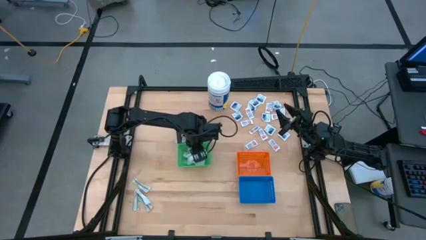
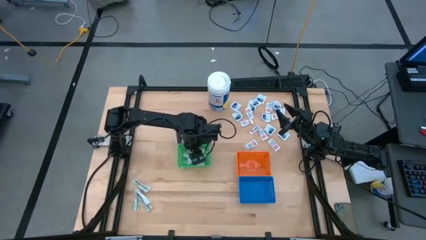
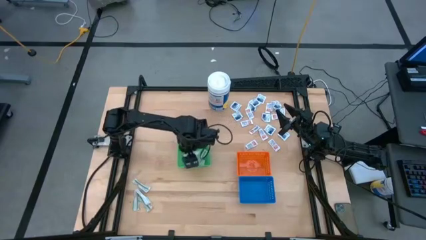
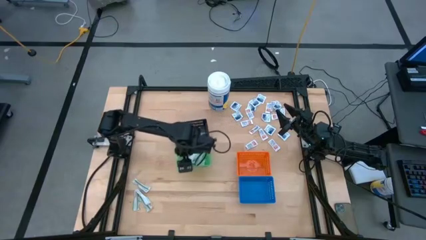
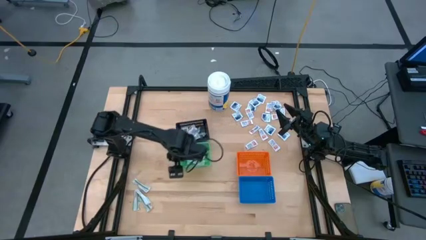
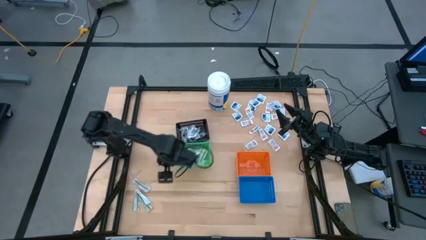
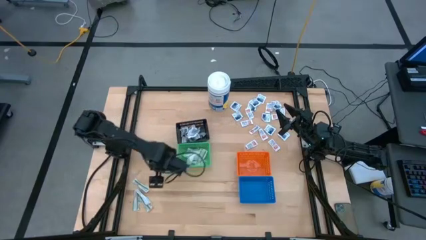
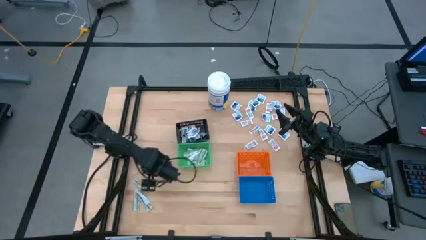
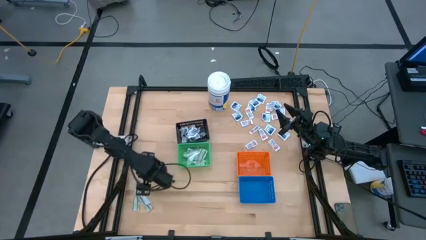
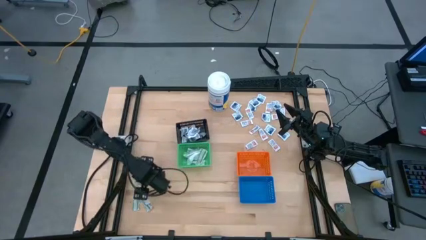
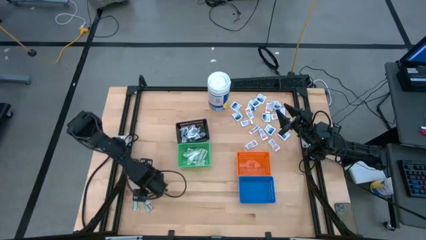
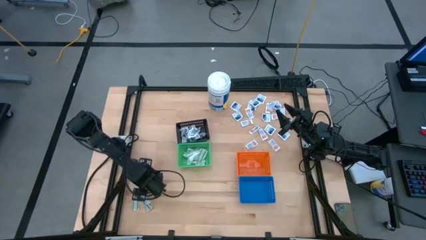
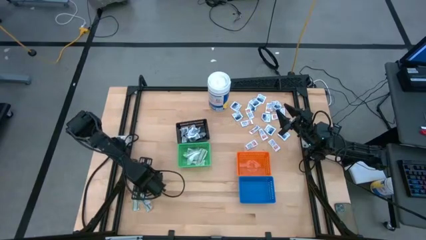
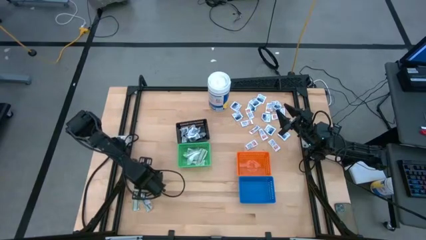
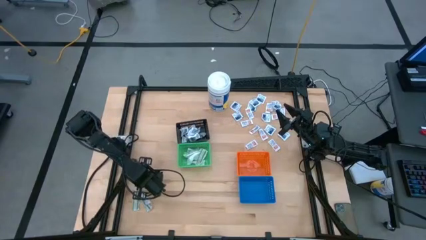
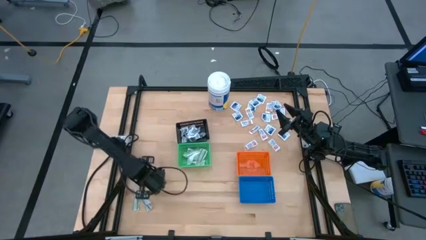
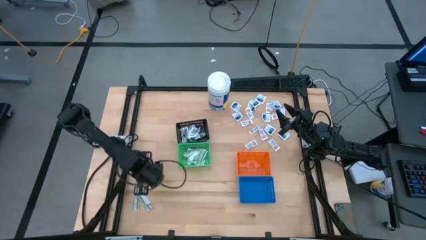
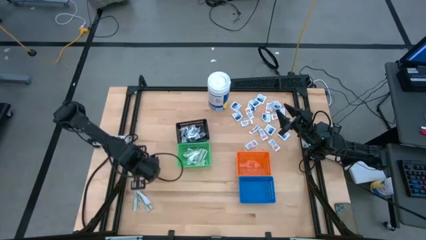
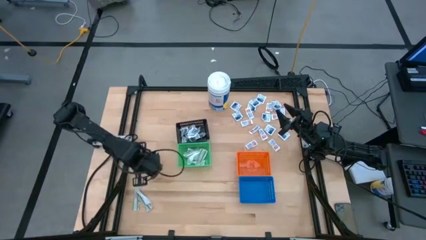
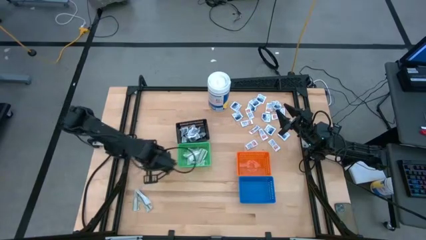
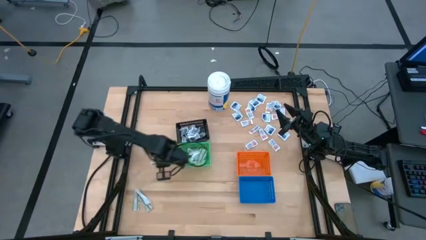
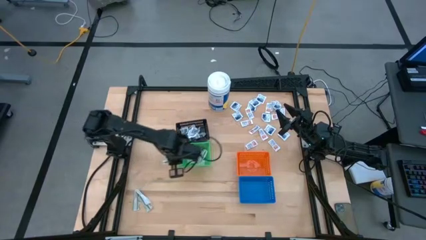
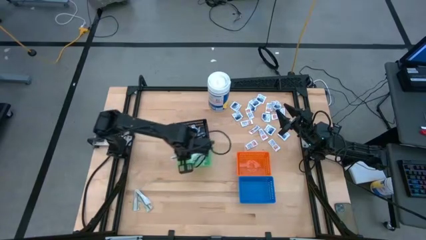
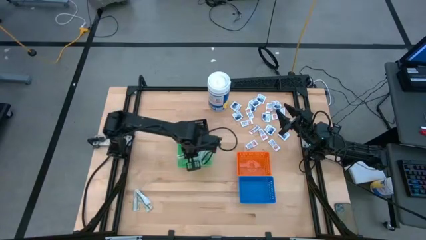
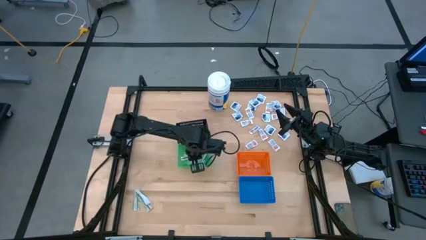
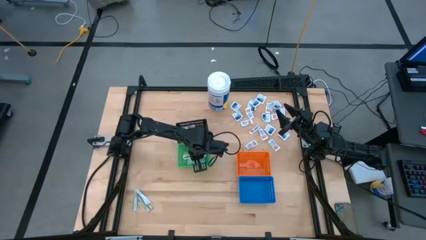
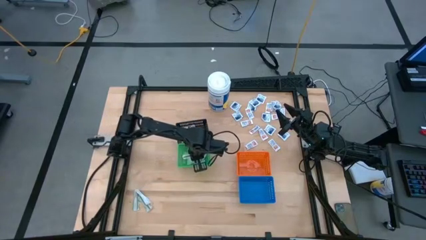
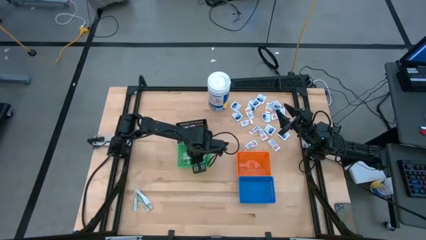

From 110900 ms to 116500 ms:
Task: Pick & Place First Aid Supplies
Put the green bandage into the green bin

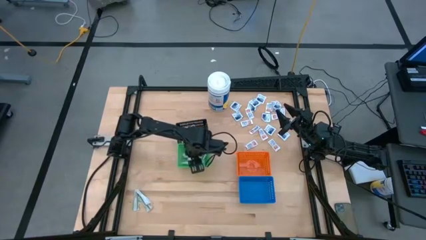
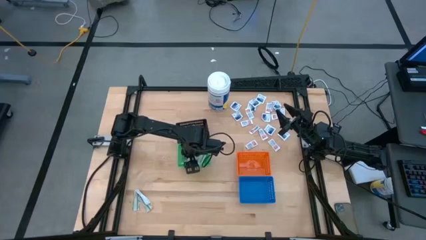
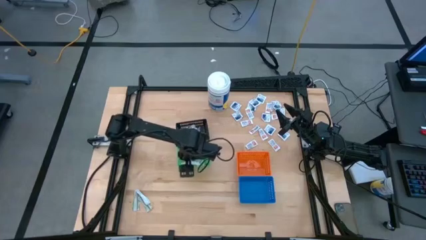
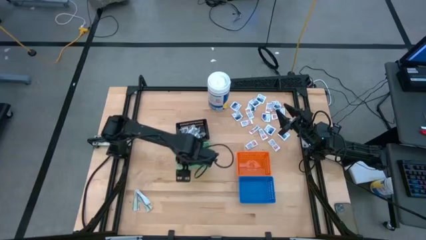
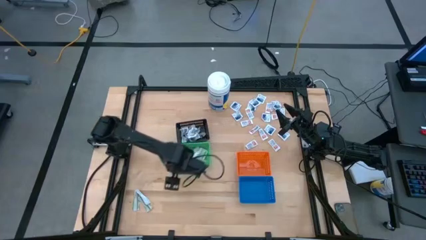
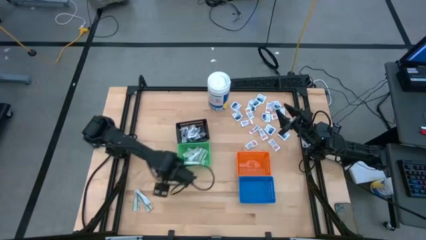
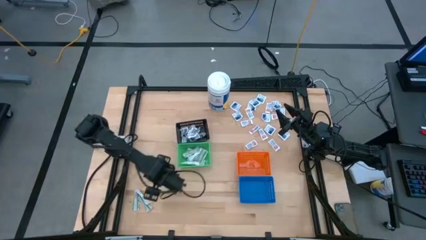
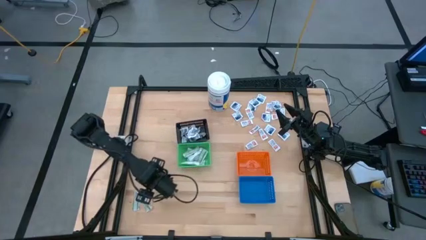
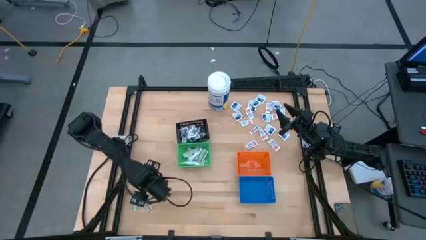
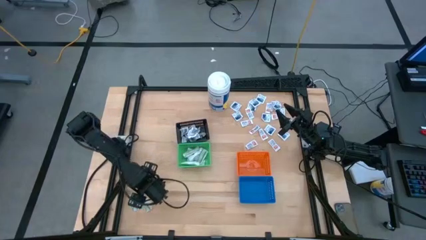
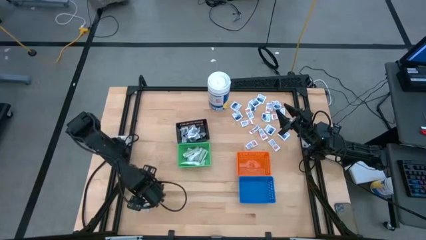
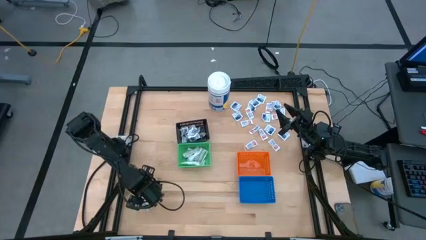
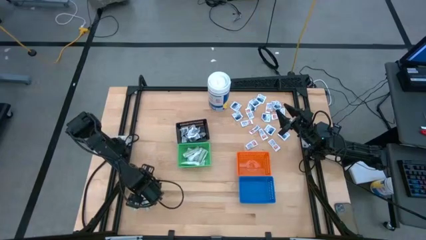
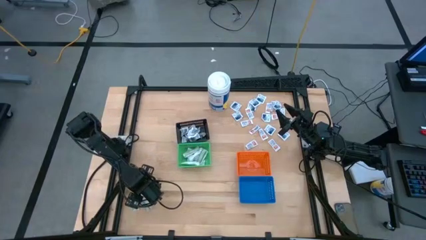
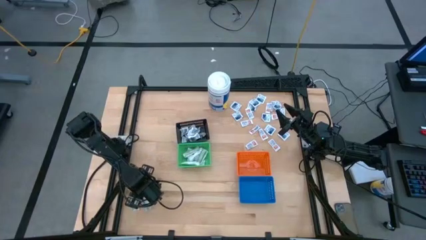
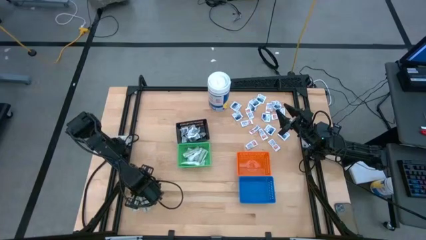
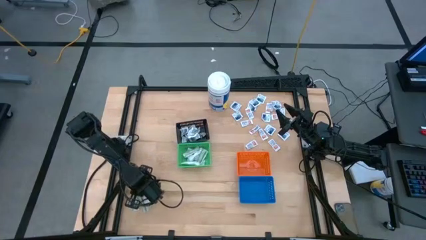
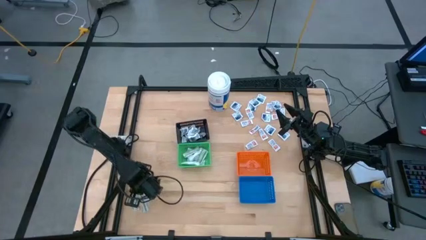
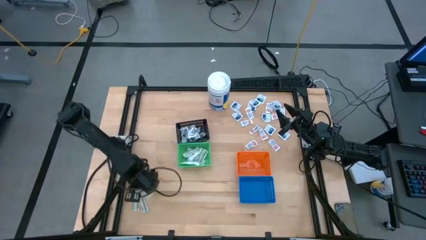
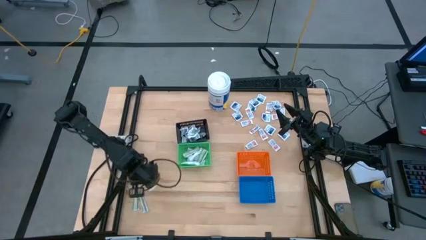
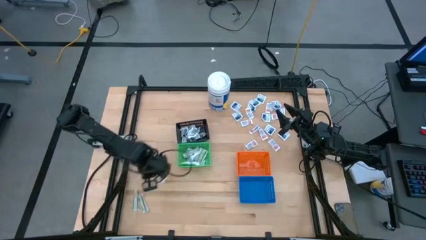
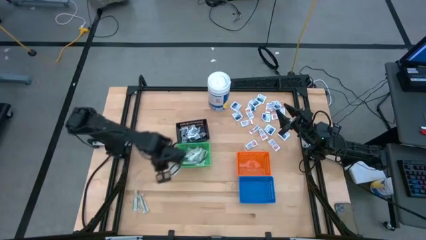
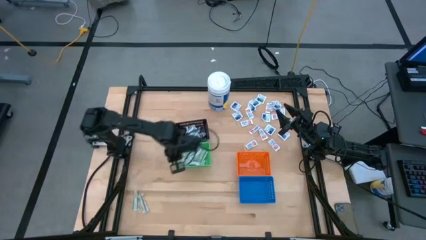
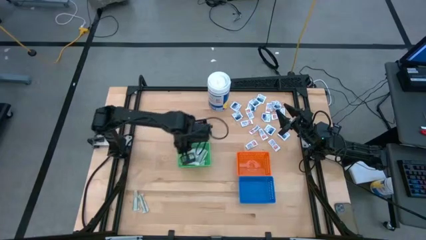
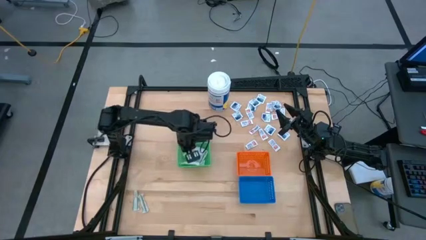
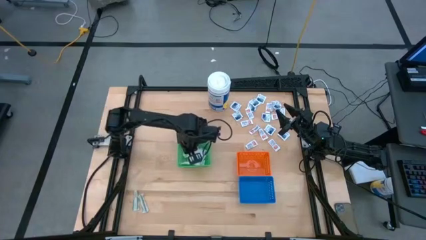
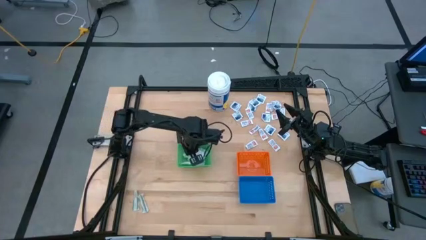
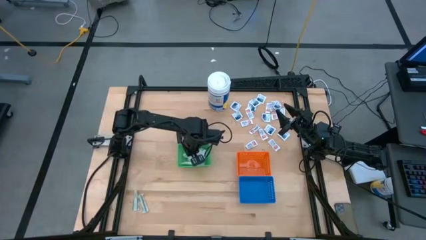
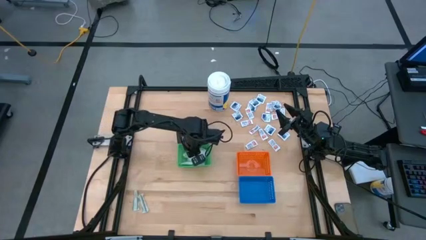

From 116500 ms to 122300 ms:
Put the green bandage into the green bin

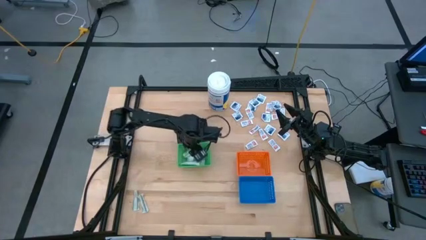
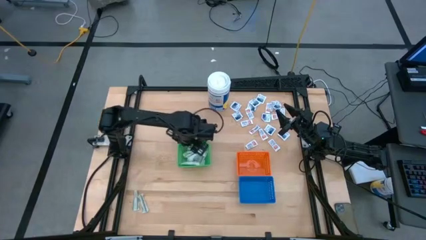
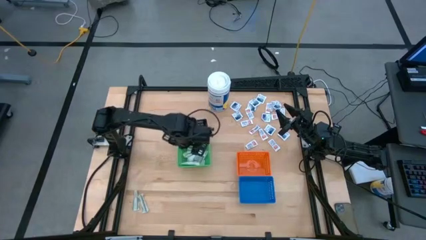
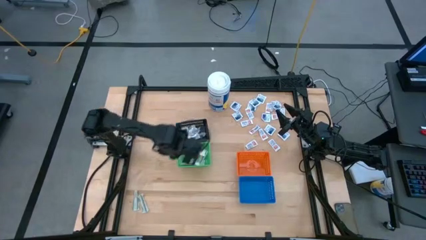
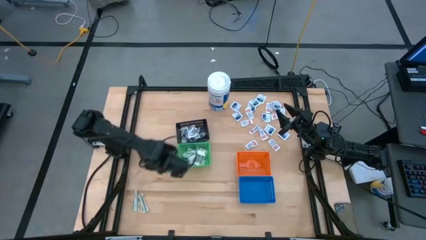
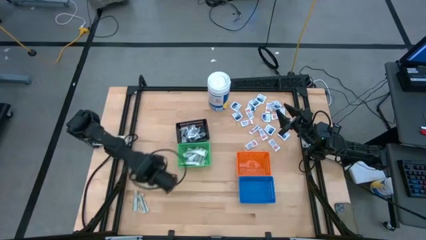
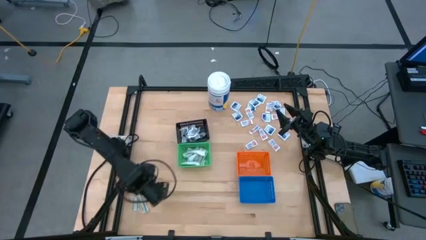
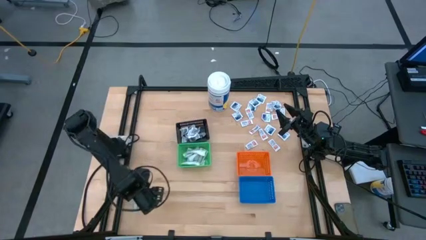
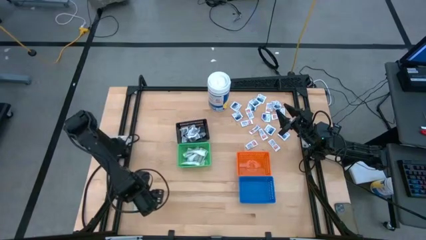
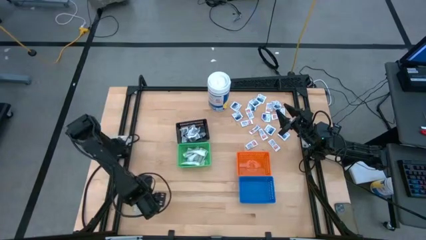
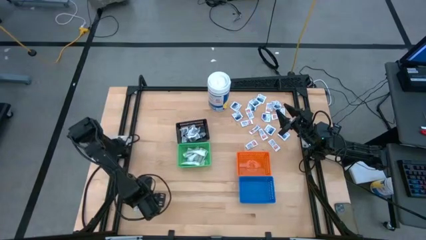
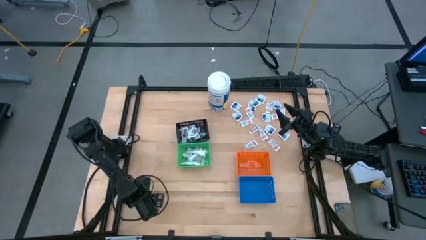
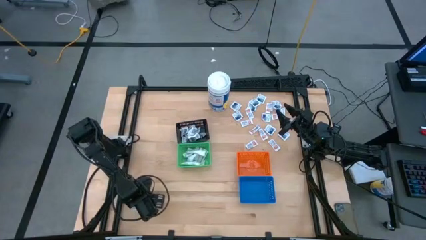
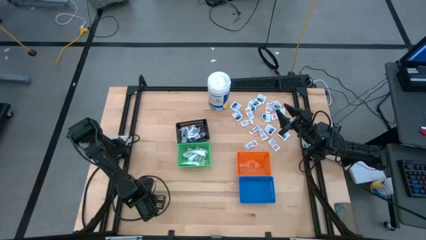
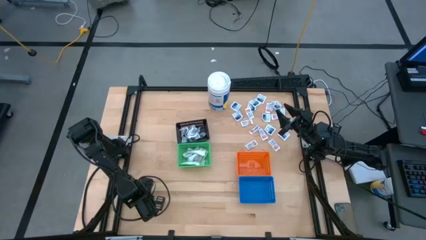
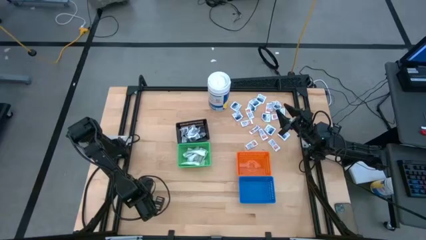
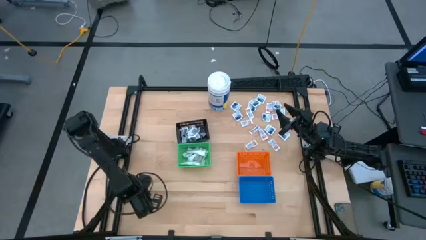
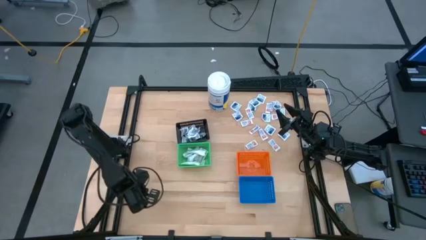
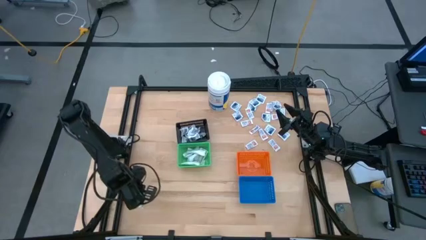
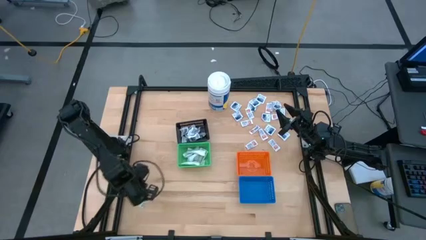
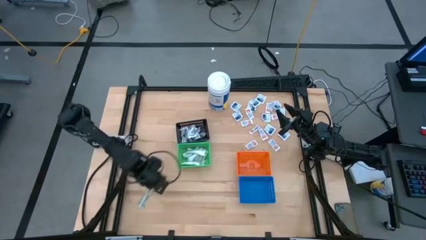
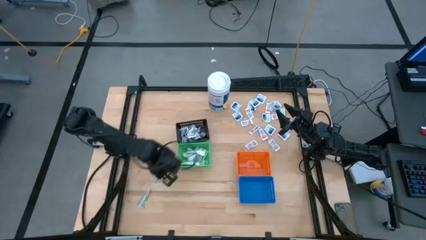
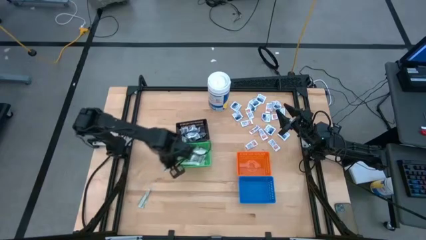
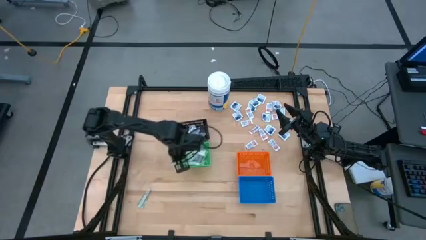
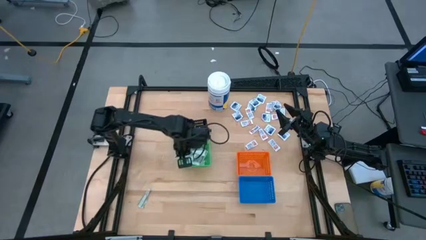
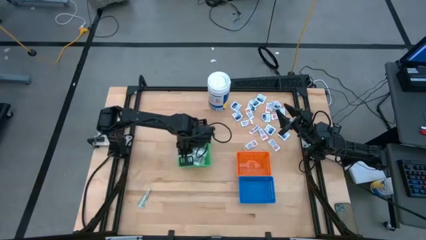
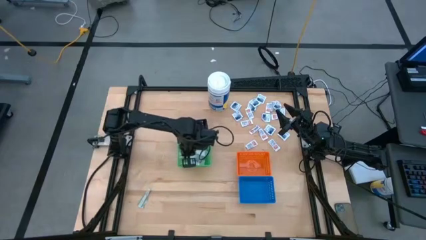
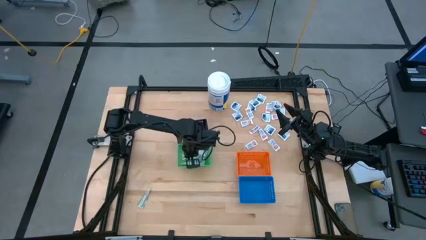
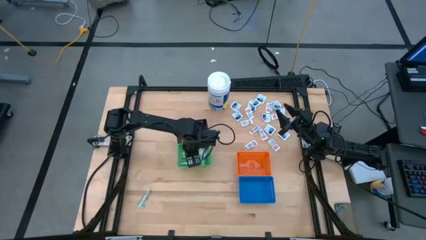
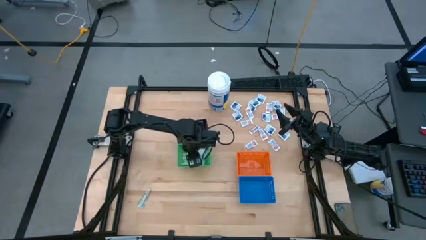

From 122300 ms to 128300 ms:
Put the green bandage into the green bin
